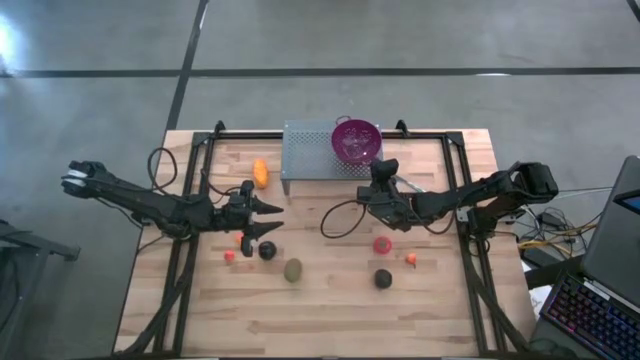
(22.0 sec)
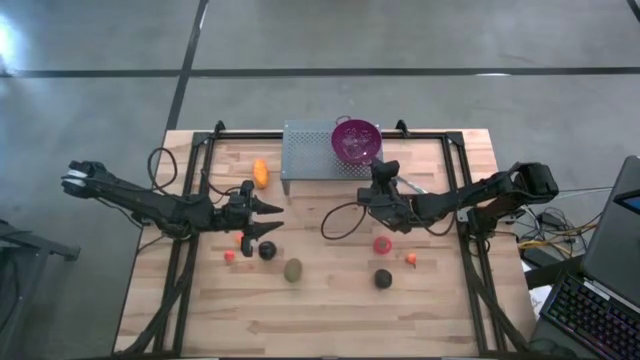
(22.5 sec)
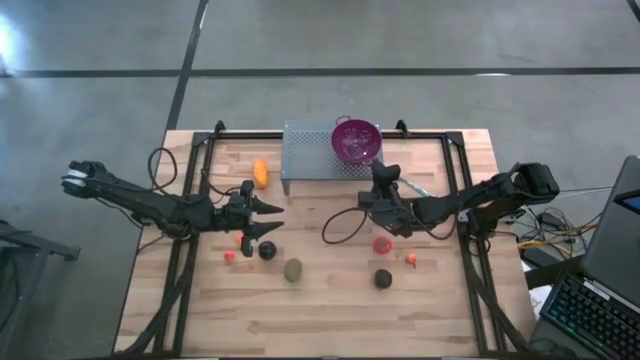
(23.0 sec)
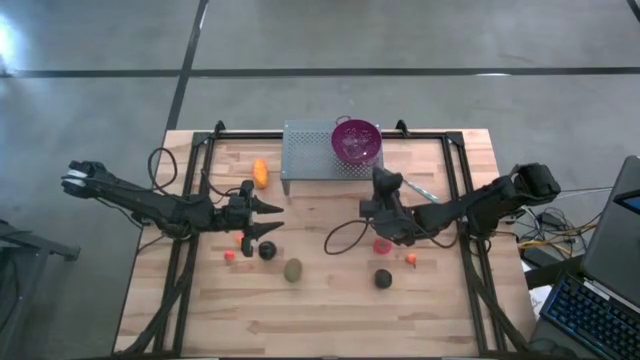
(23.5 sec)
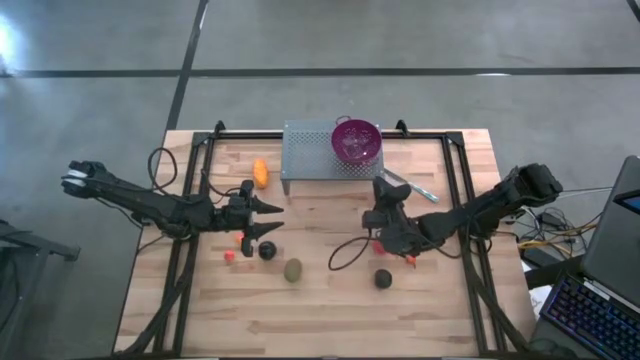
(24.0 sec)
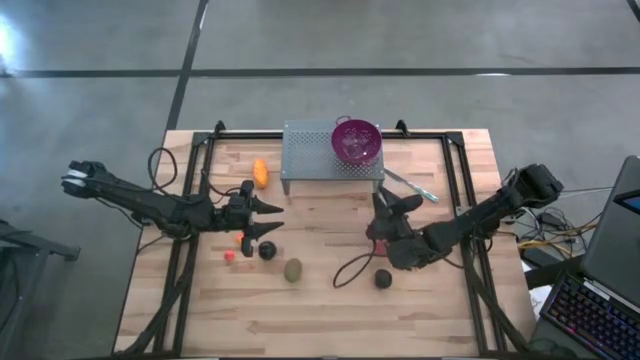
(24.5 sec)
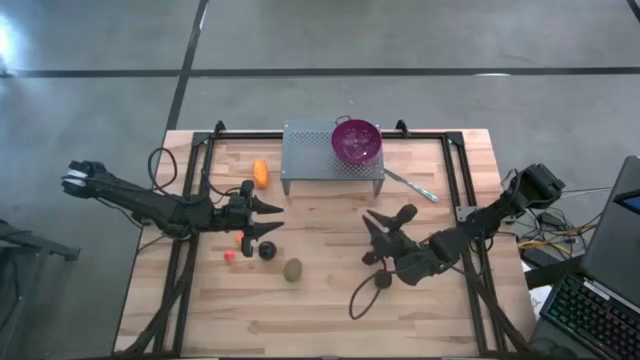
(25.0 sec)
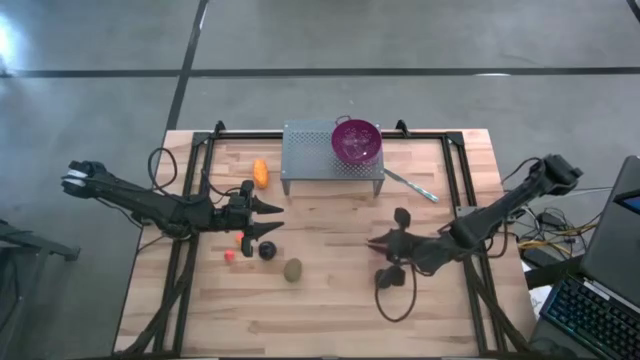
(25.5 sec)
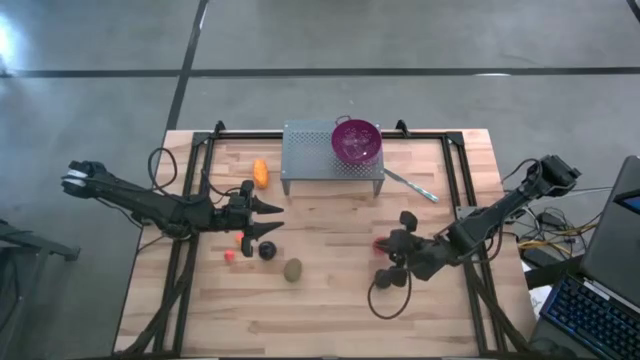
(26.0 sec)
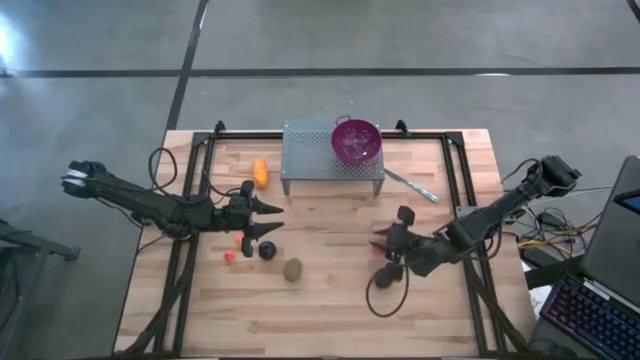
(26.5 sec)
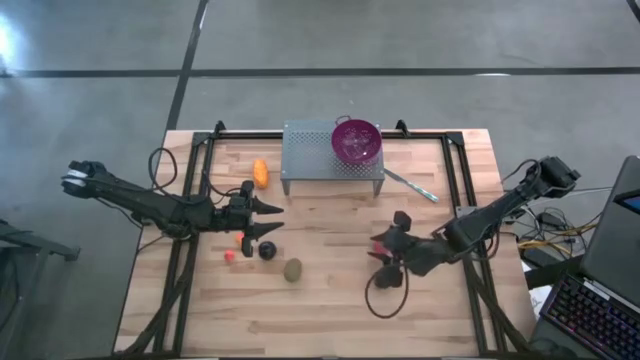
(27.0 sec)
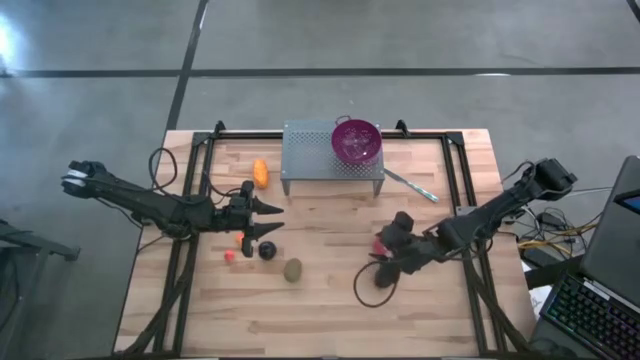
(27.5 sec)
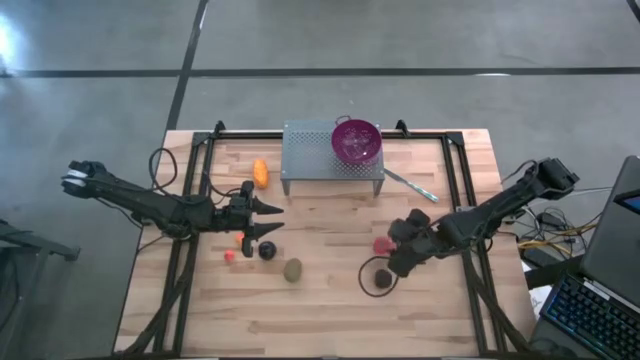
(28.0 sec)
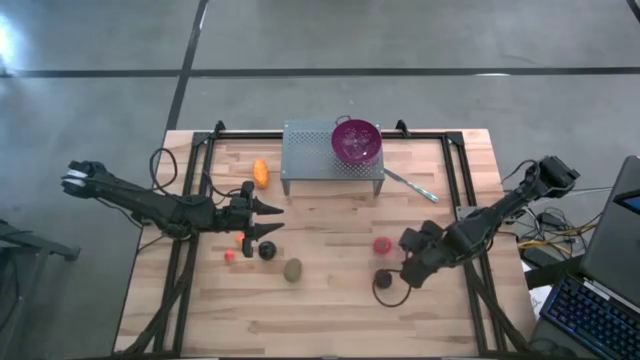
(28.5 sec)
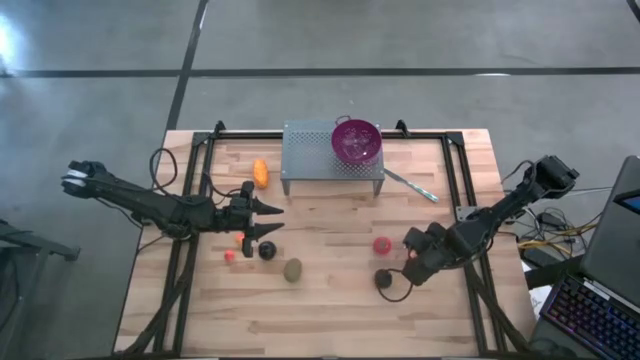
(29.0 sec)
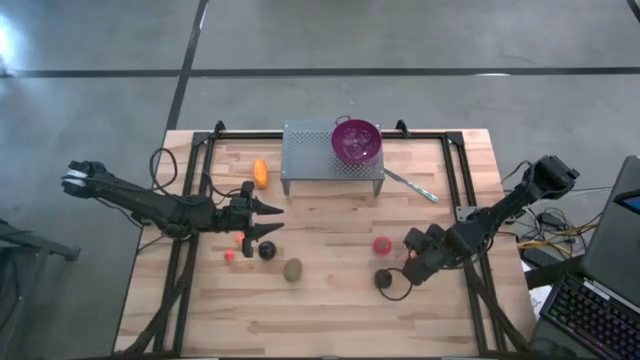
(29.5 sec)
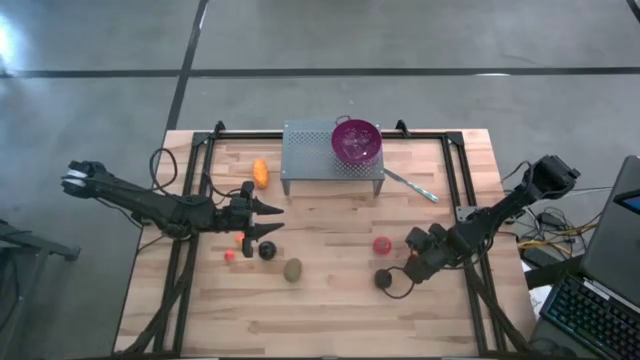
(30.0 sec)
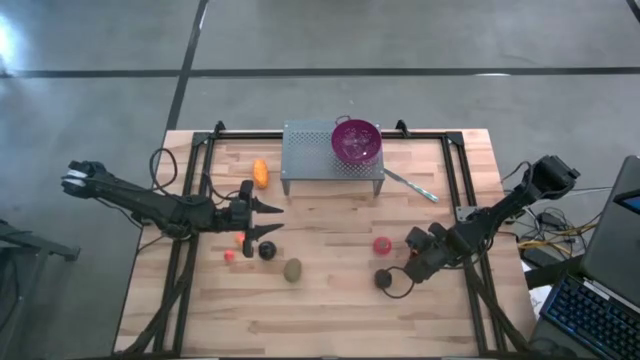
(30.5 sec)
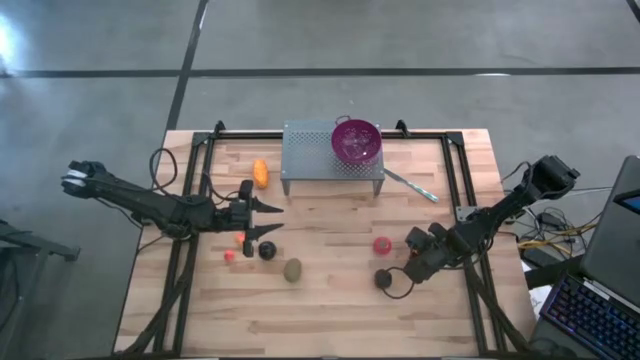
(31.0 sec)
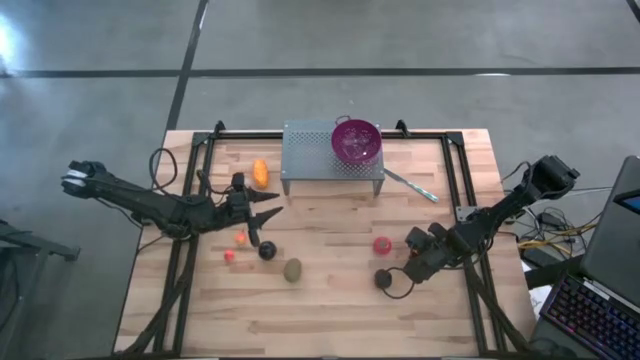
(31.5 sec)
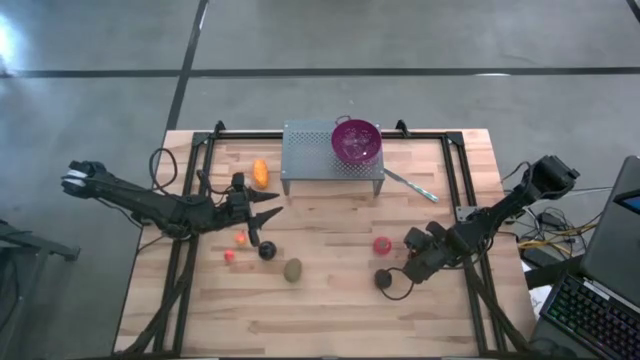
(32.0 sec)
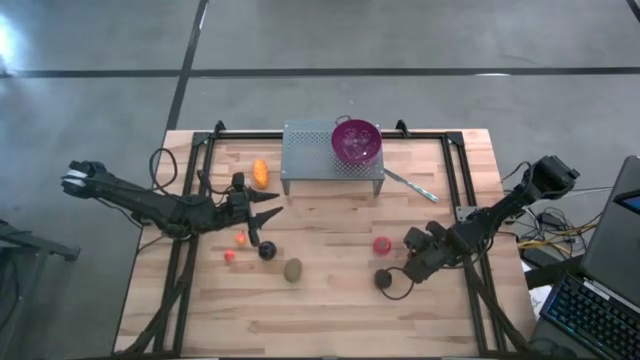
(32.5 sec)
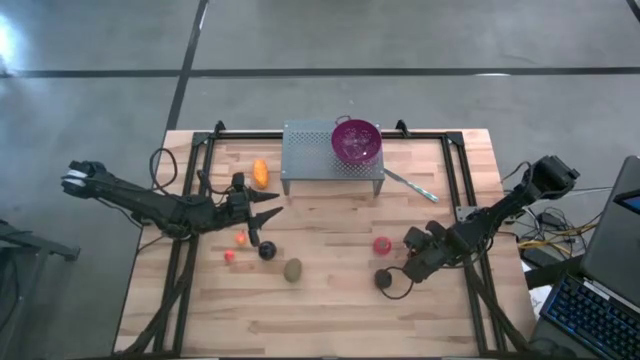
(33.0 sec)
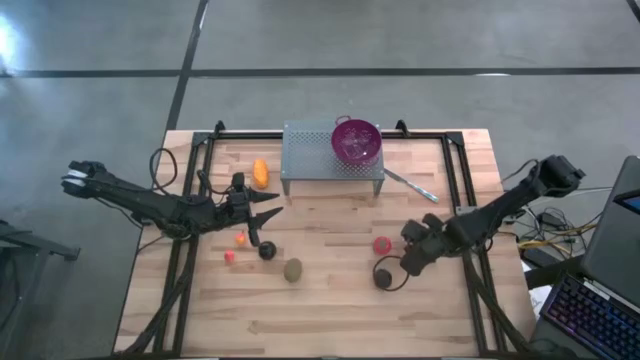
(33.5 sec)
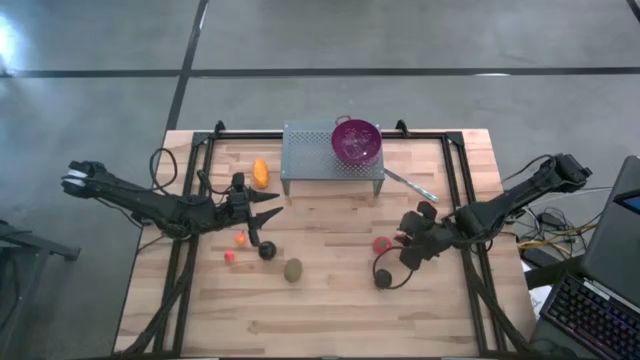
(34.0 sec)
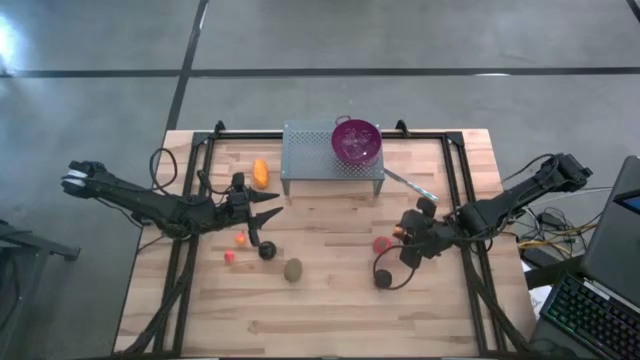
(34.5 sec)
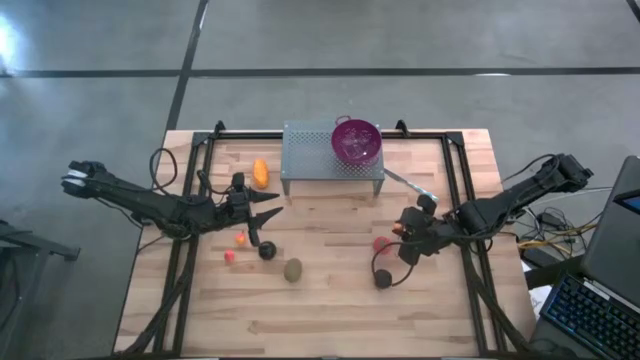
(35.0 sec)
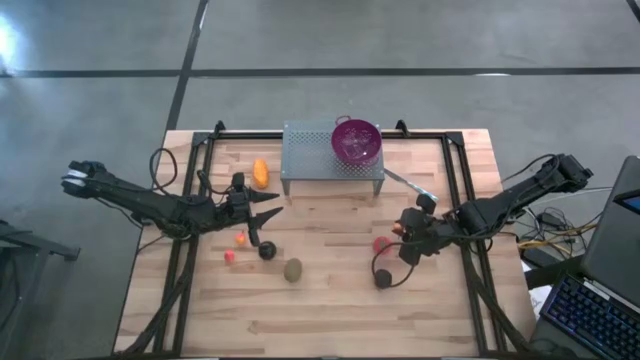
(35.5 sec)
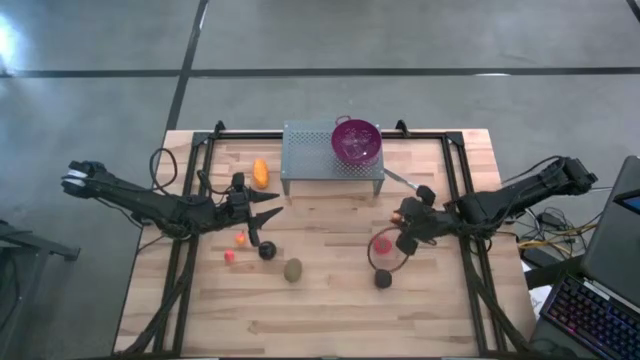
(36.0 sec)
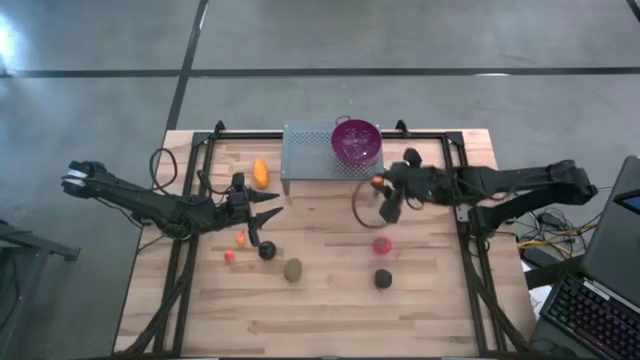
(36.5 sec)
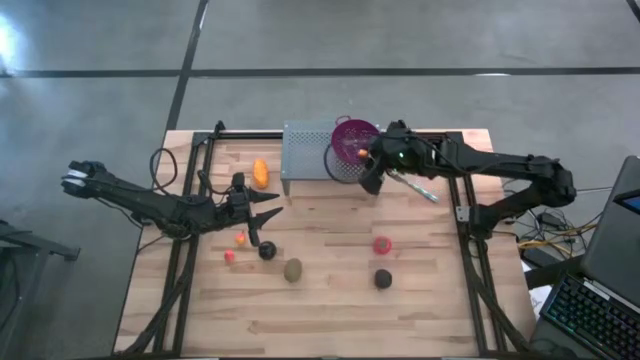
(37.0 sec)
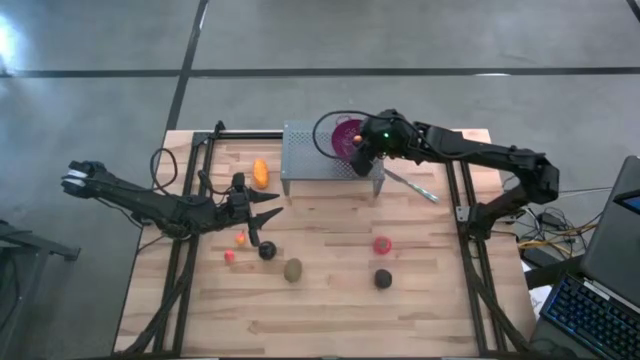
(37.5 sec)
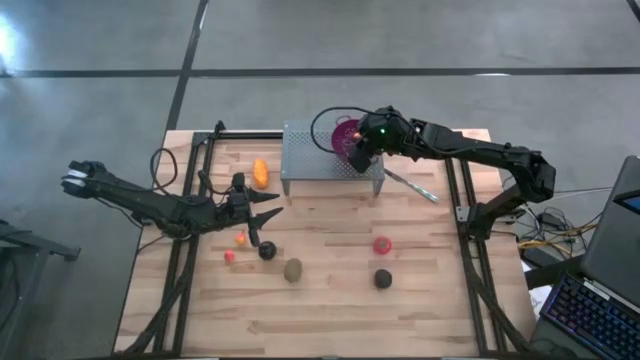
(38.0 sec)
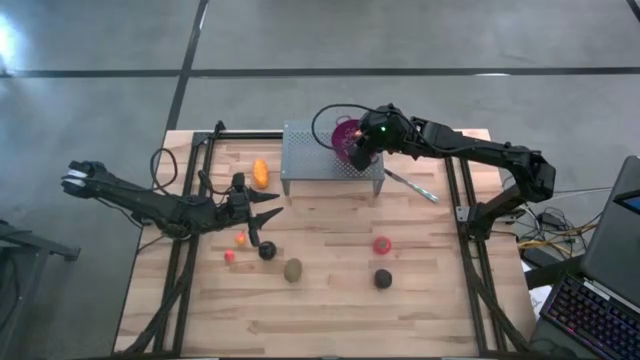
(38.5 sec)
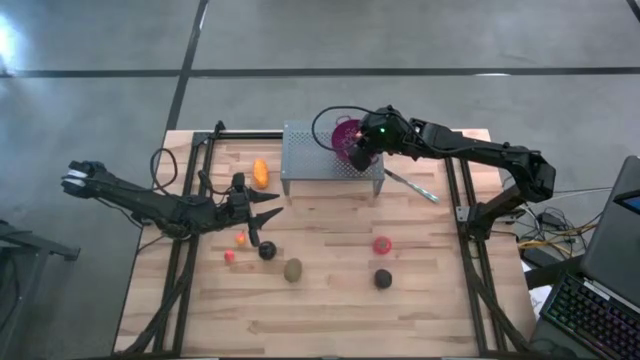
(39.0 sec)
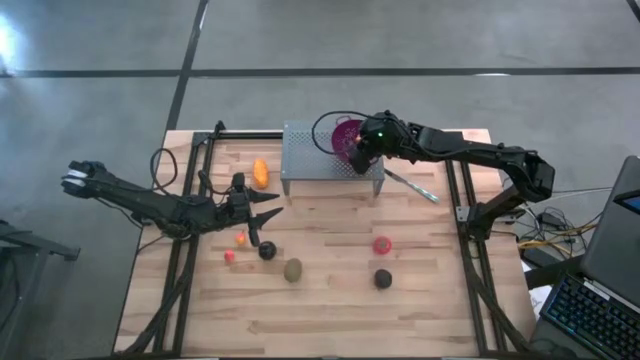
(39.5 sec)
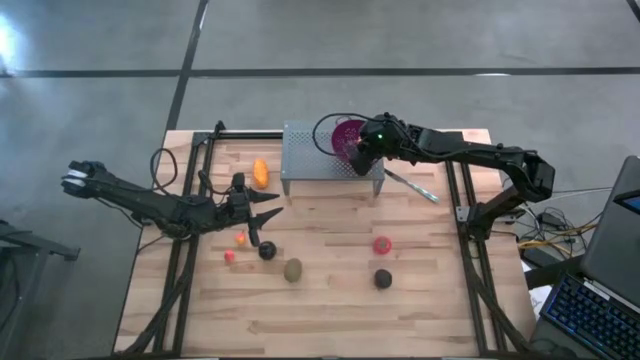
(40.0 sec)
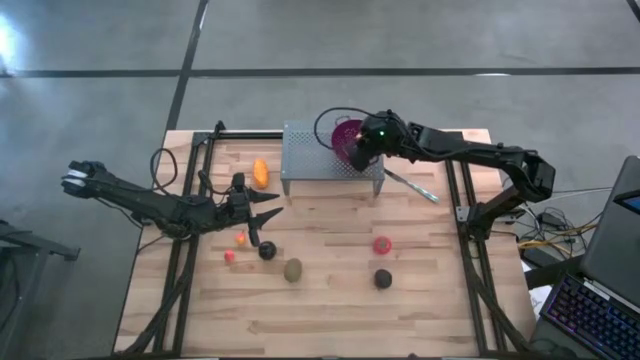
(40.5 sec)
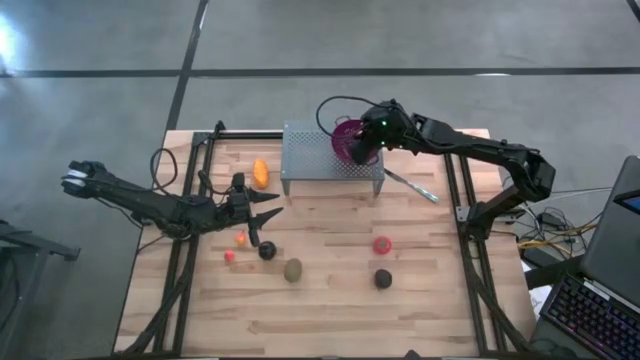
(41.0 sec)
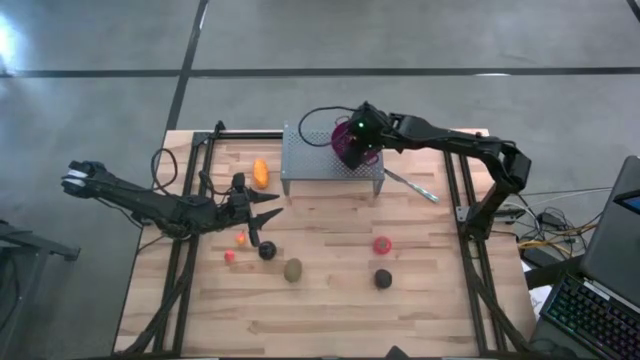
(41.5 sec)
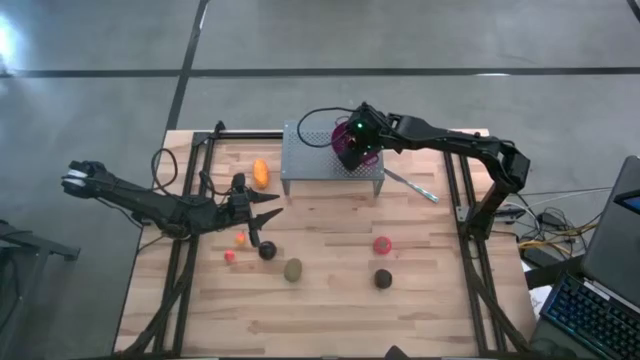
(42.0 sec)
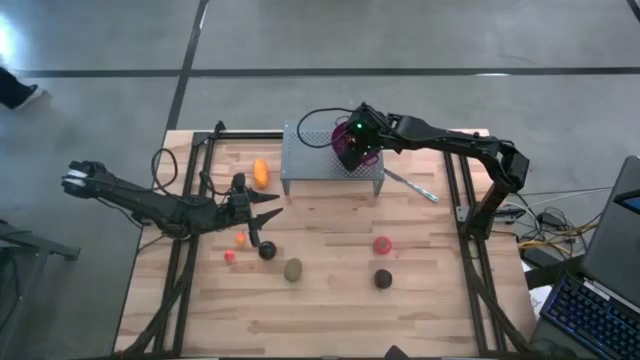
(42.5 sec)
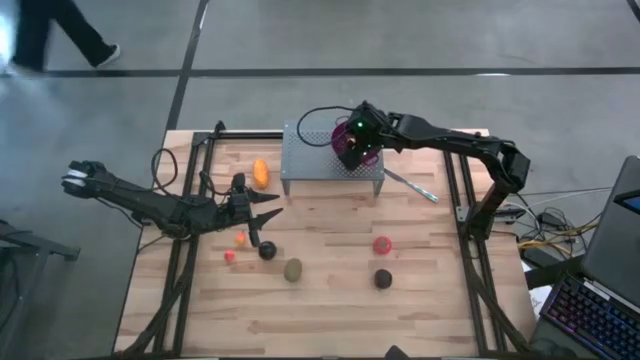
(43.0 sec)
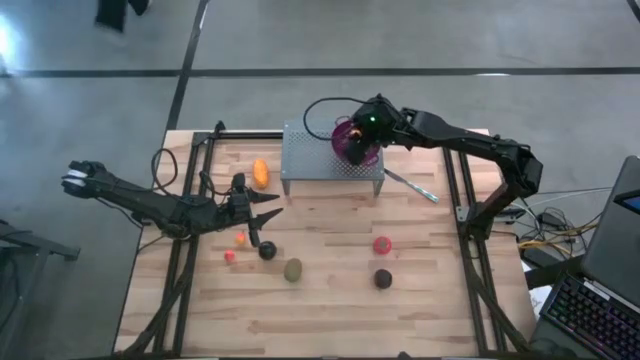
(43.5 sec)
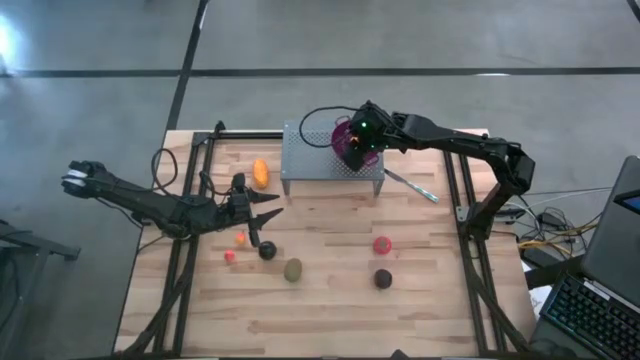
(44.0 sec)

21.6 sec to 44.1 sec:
Task: Pick & Place Fruit
Put the pear into the purple strainer bowl on the shelf
